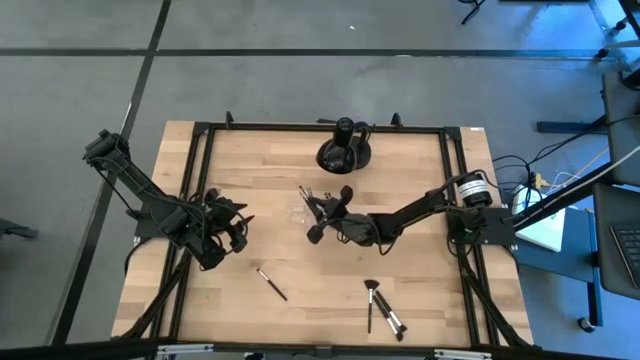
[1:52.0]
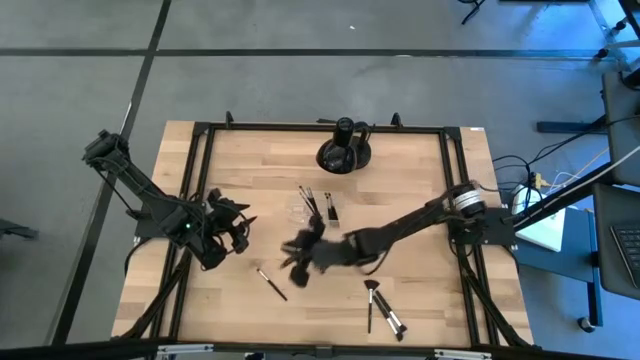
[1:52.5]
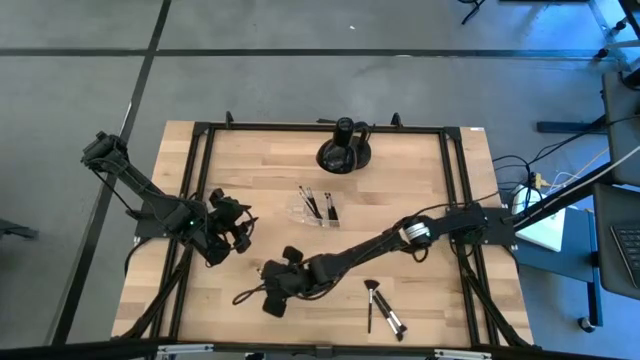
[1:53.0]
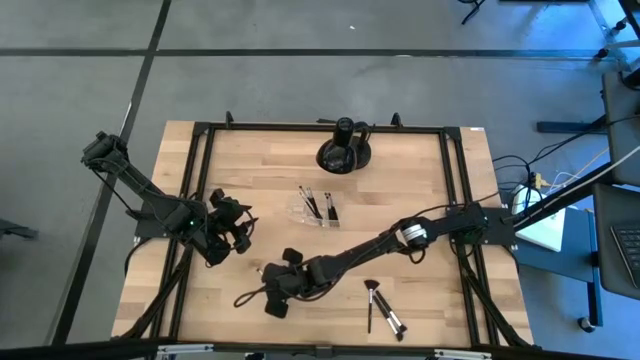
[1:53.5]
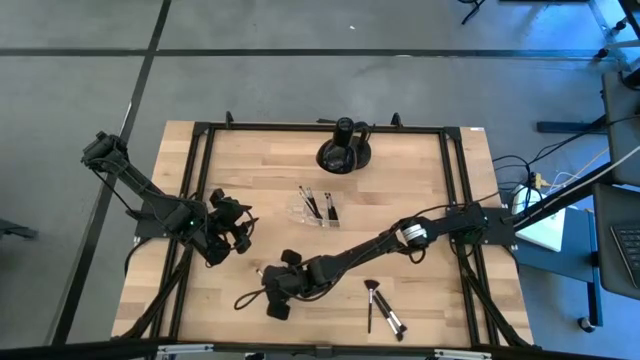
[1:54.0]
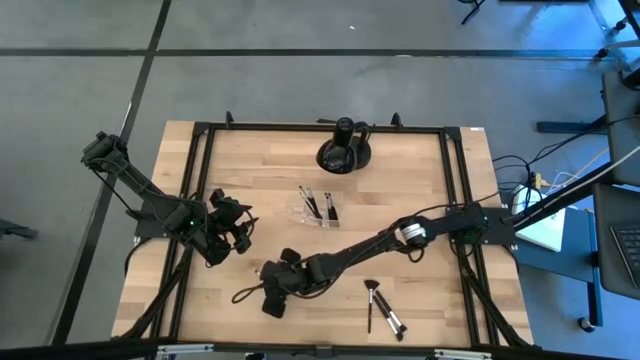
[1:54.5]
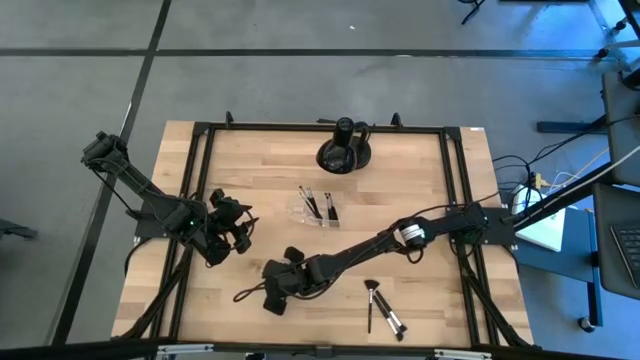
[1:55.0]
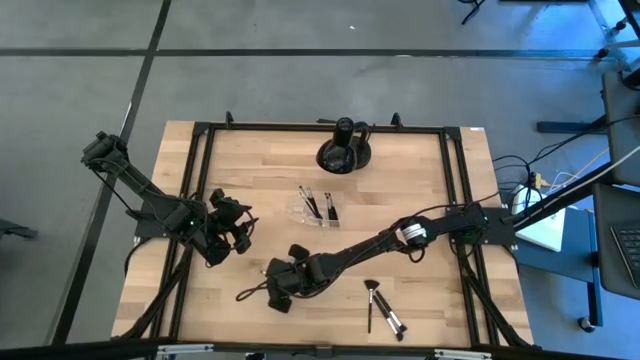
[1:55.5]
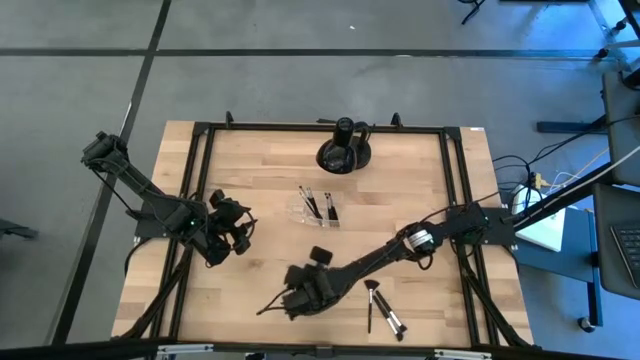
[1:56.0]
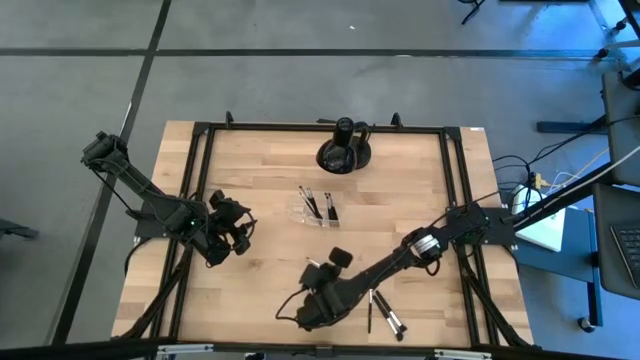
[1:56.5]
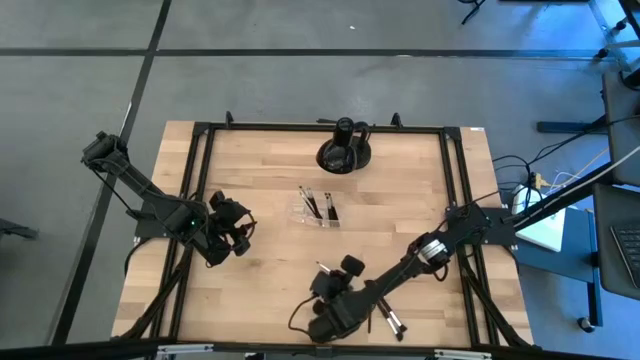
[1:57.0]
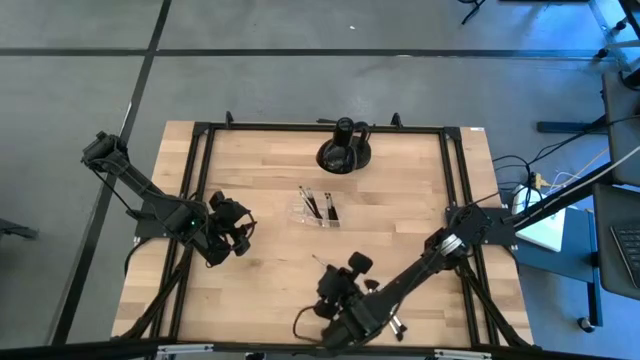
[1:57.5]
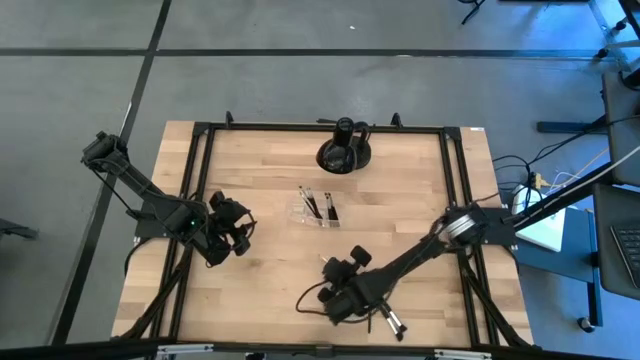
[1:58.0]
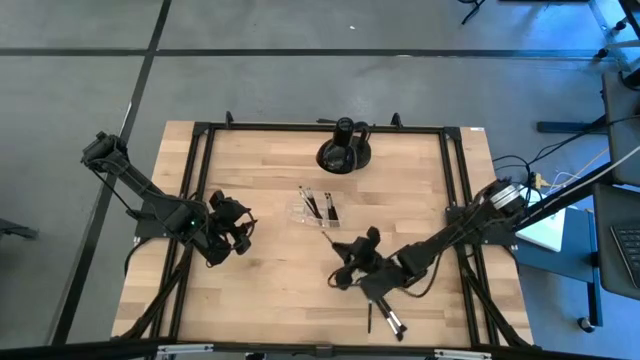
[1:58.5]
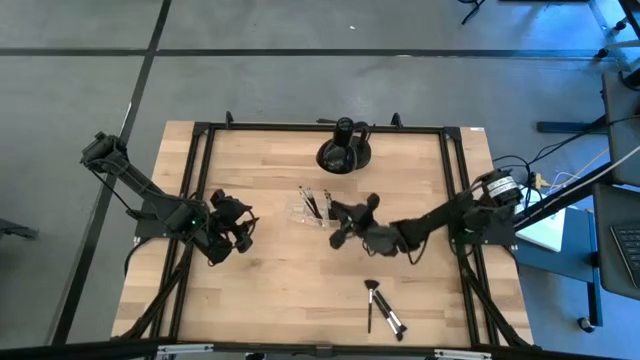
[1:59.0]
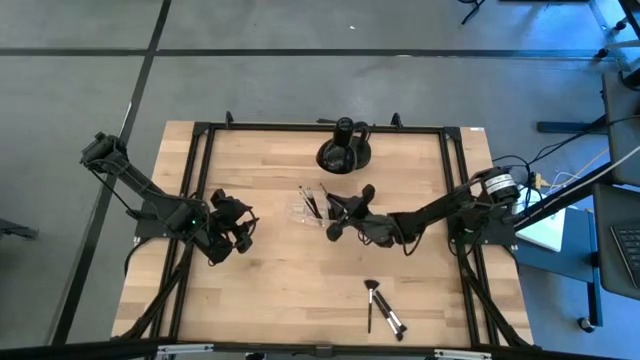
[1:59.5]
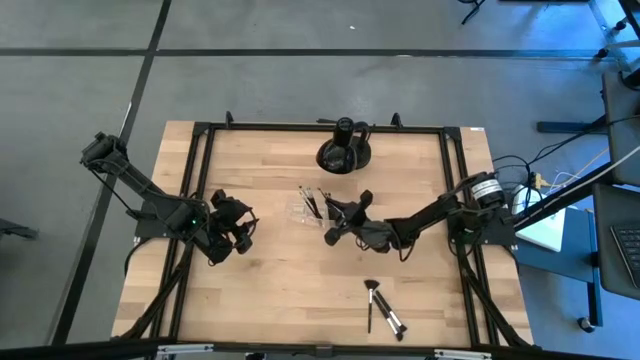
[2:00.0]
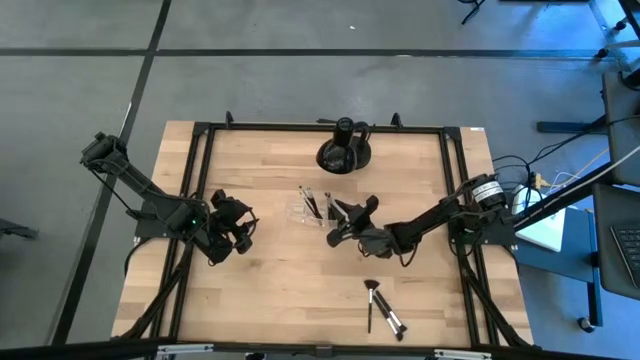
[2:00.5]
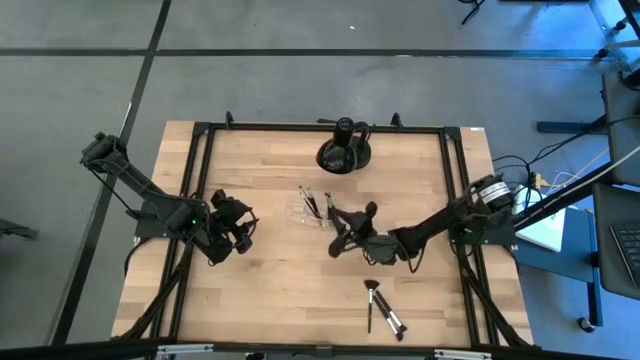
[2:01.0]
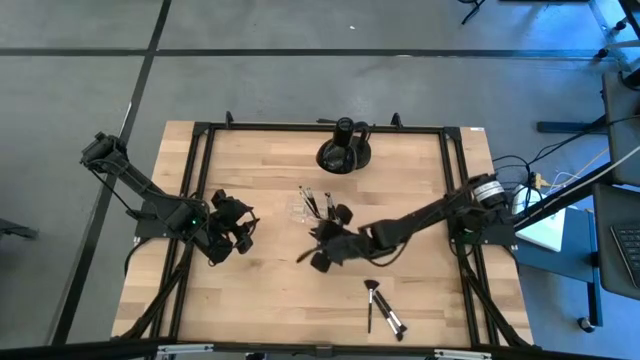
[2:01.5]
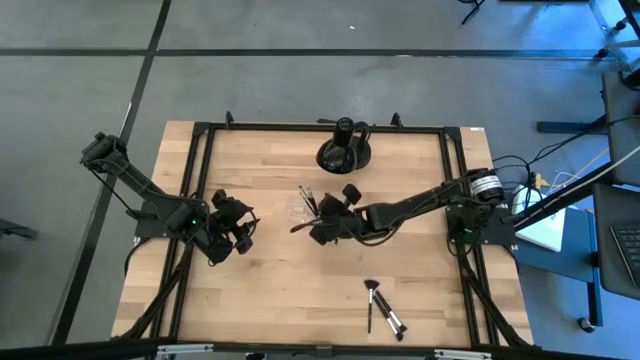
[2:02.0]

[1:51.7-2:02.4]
Task: Pick & Place Makeup Supplies
Put the makeup brush into the transparent organizer

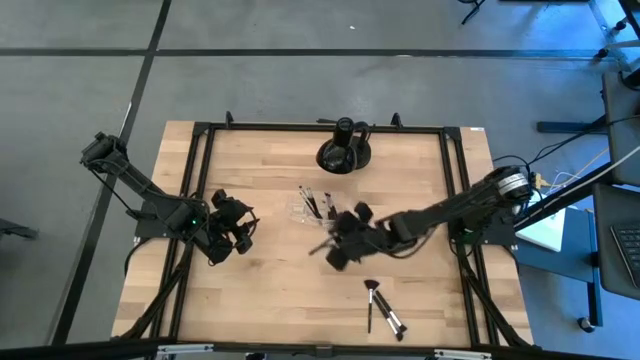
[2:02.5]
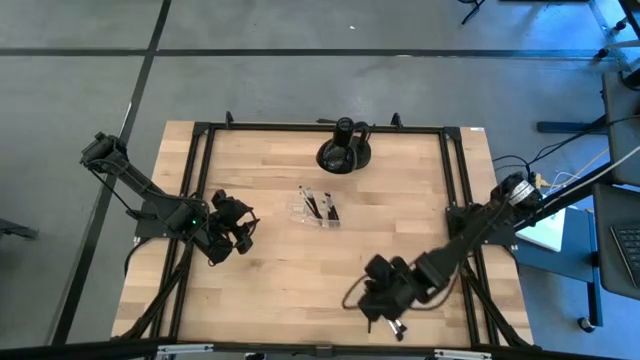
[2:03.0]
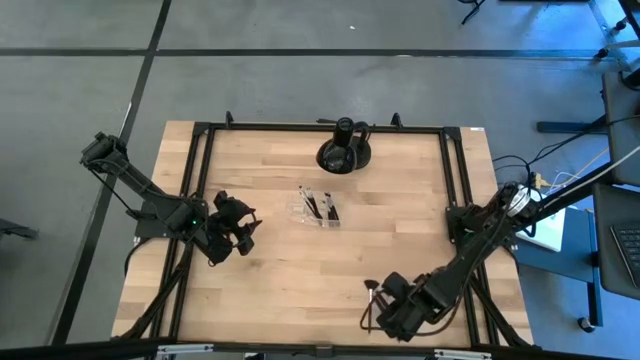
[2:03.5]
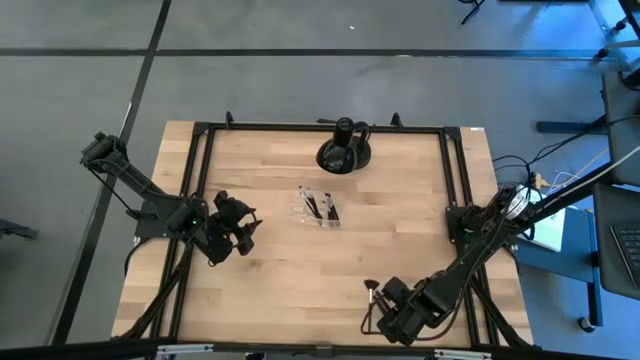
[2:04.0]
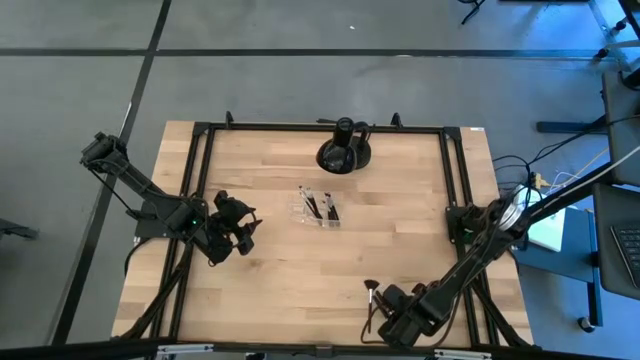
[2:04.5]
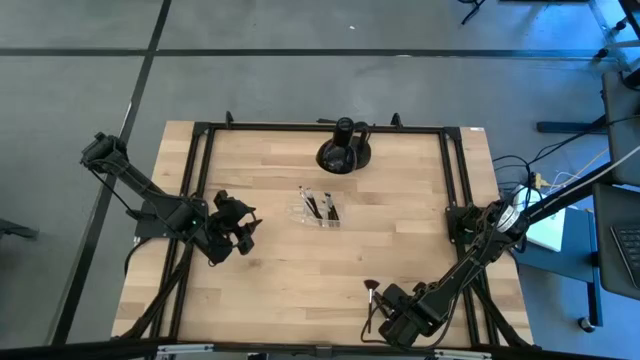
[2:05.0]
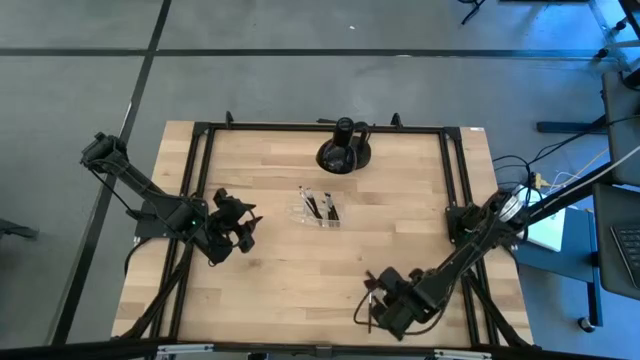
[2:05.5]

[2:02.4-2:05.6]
Put the makeup brush into the transparent organizer

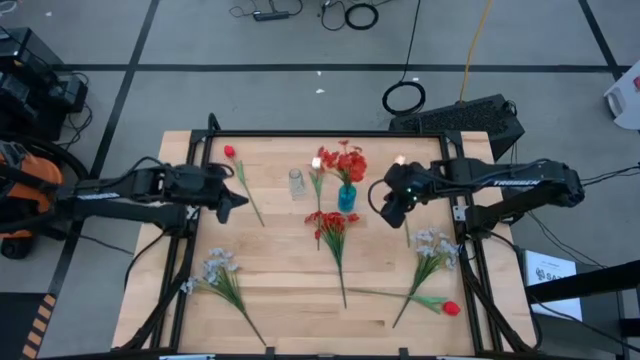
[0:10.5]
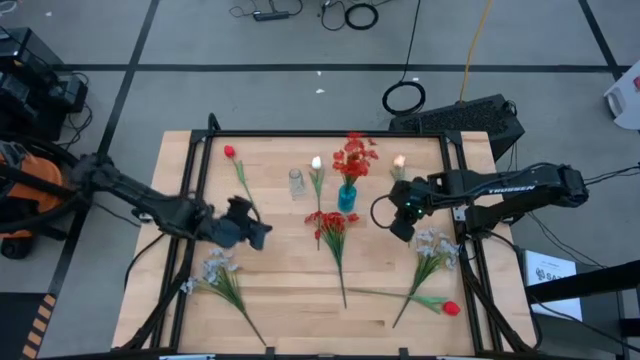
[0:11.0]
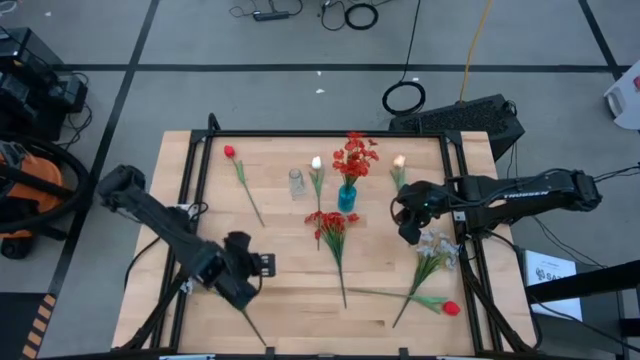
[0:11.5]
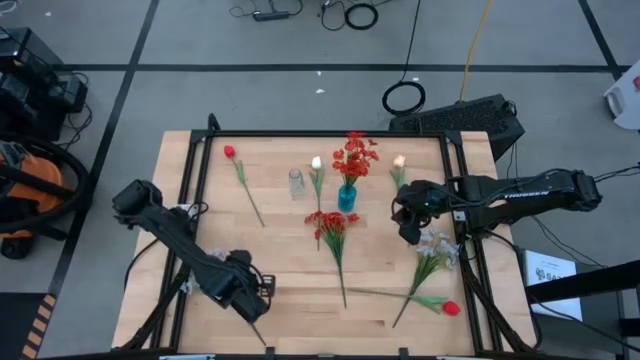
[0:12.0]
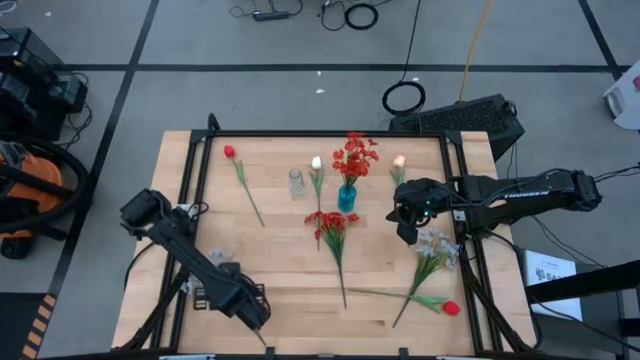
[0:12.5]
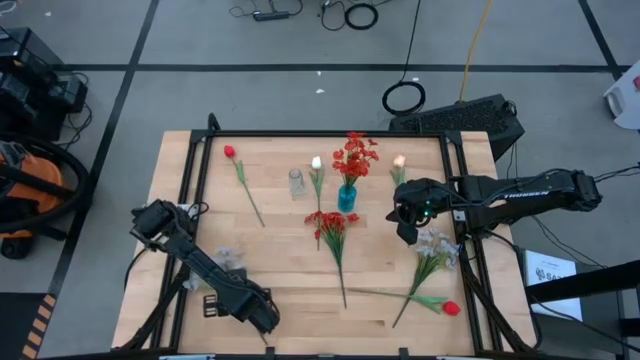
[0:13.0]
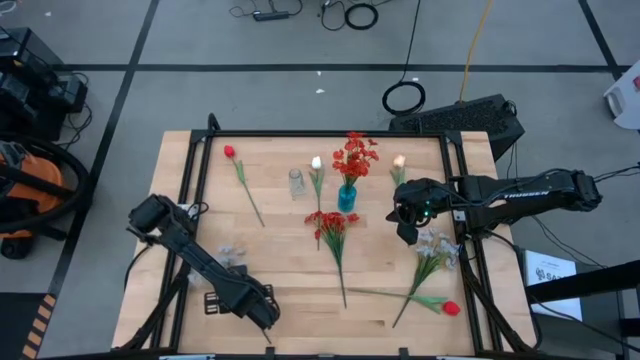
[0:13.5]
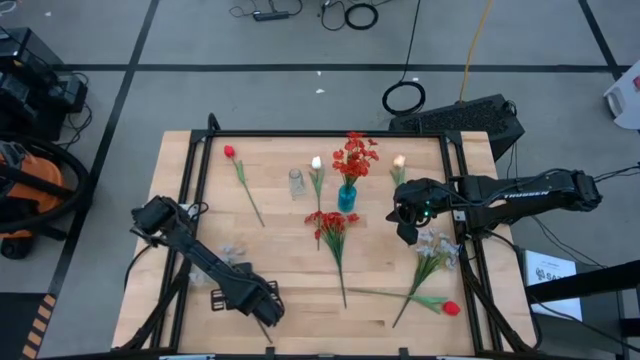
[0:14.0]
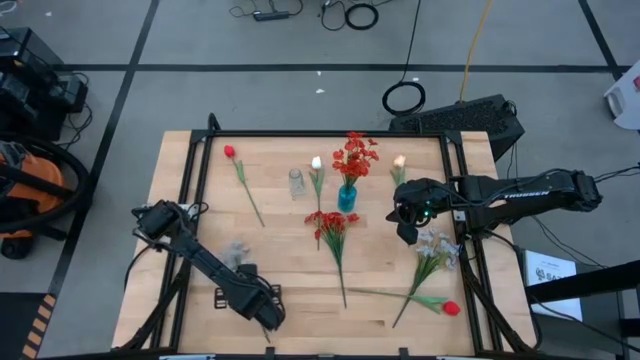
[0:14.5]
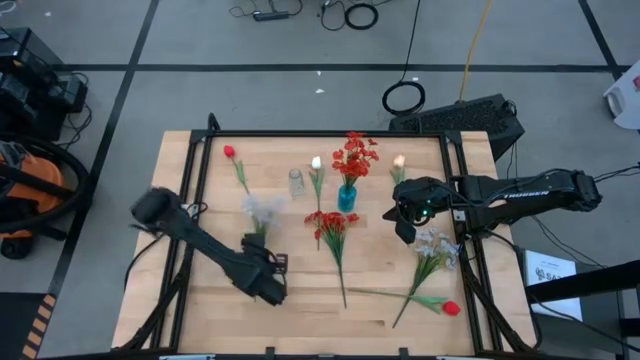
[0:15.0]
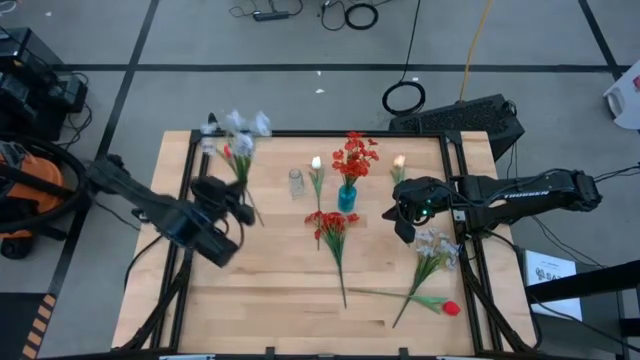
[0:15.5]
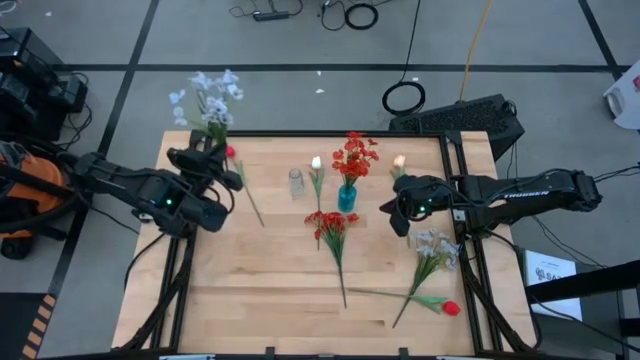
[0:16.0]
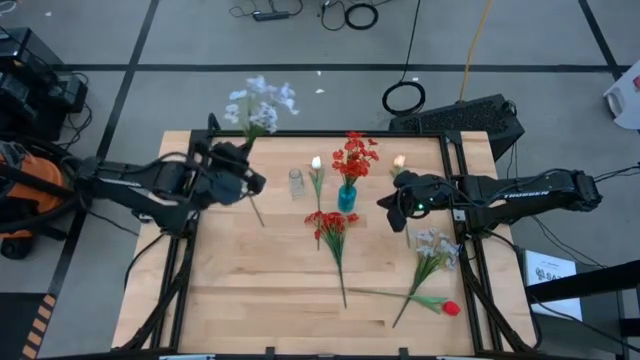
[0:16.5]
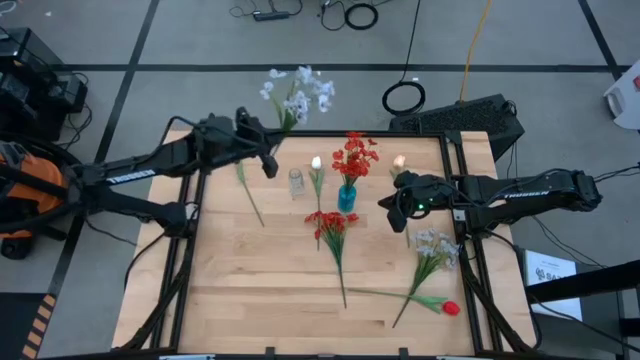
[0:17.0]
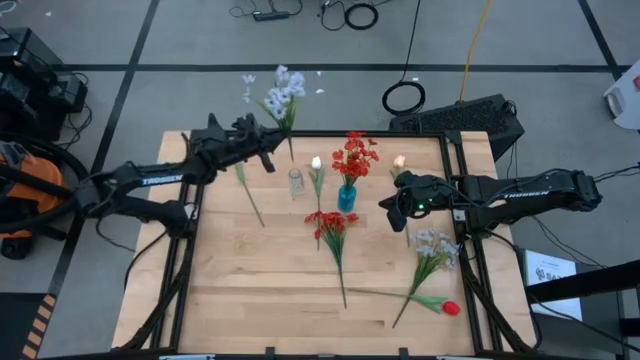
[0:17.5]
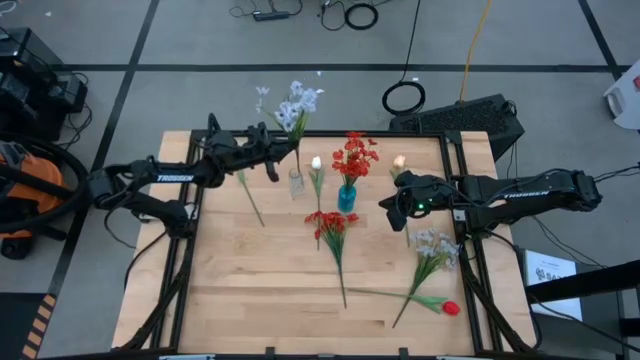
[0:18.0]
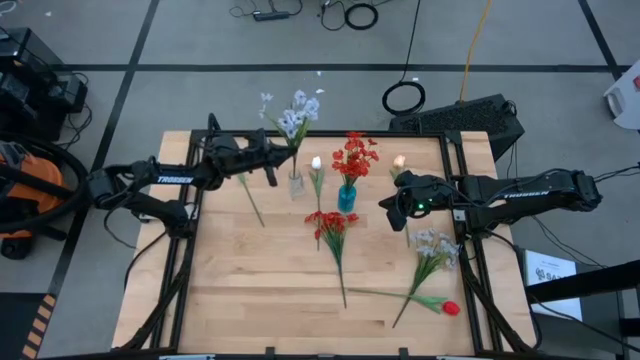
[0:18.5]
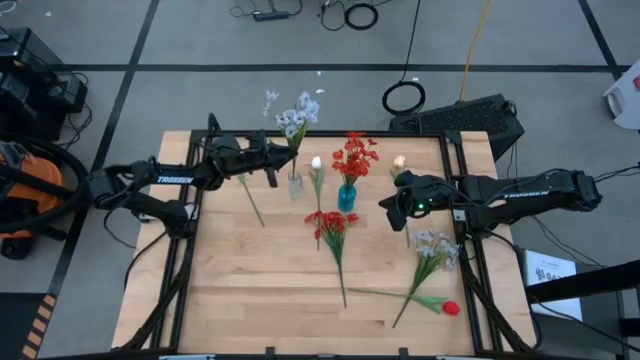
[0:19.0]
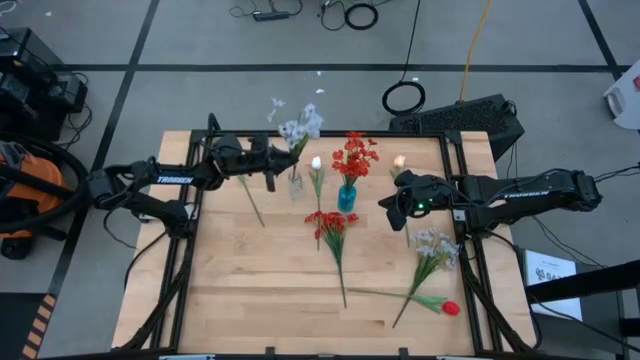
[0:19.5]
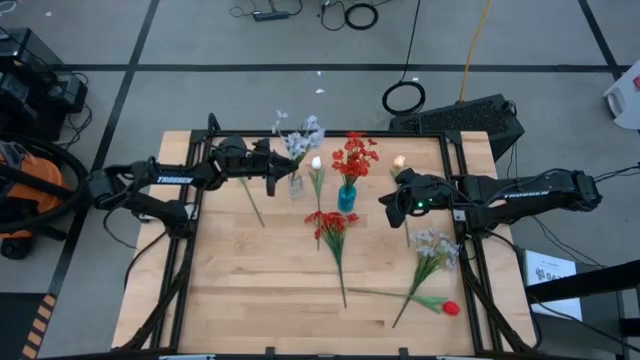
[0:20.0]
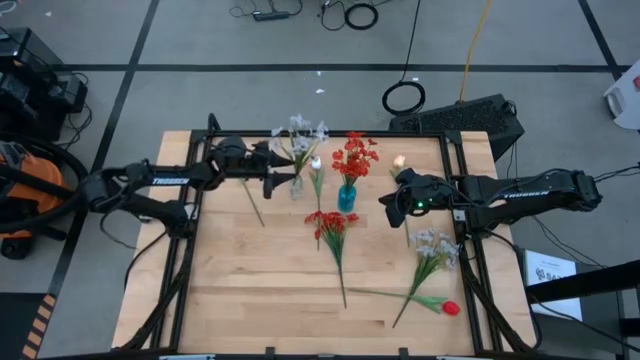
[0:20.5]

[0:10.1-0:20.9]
Task: Sort flowers into vase by color
Put the left white flowers into the transparent vase
